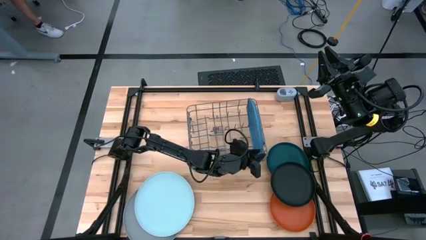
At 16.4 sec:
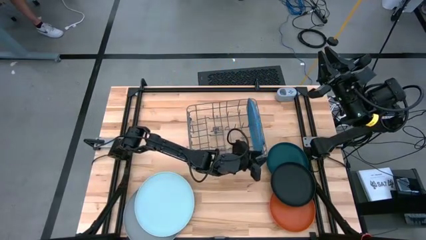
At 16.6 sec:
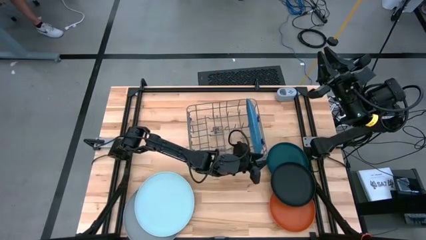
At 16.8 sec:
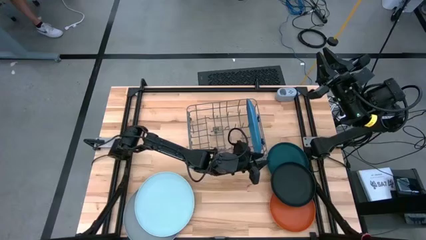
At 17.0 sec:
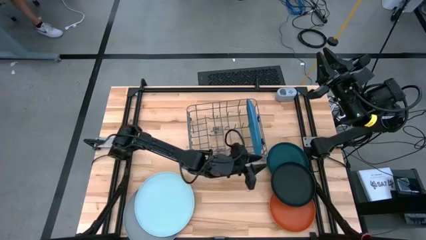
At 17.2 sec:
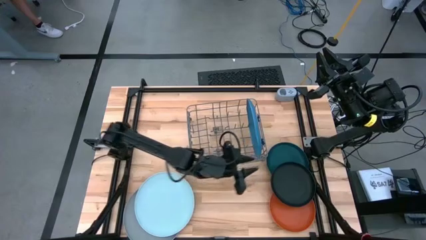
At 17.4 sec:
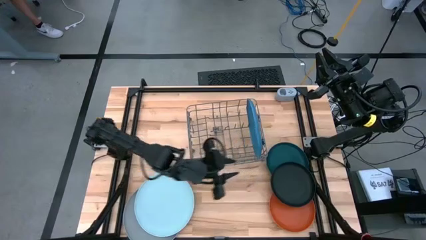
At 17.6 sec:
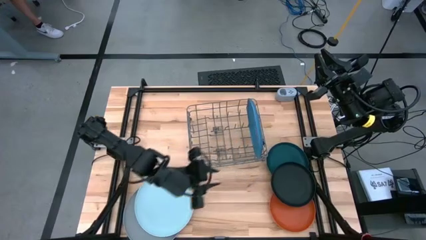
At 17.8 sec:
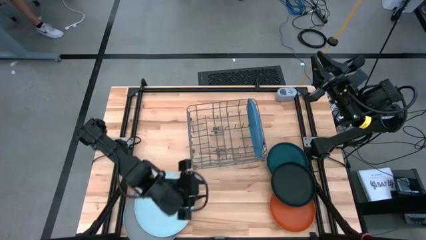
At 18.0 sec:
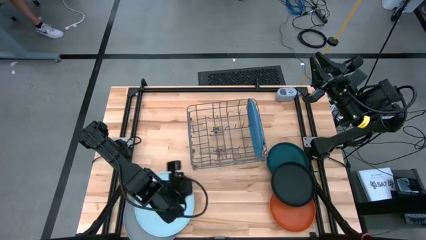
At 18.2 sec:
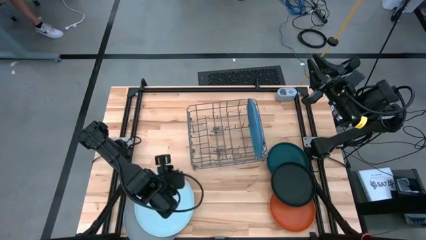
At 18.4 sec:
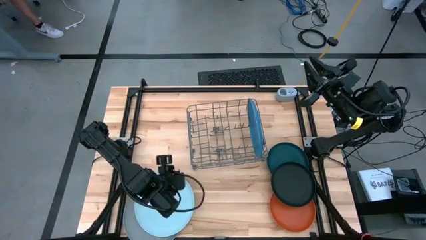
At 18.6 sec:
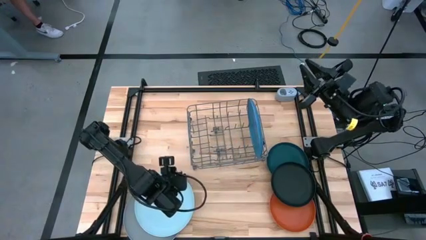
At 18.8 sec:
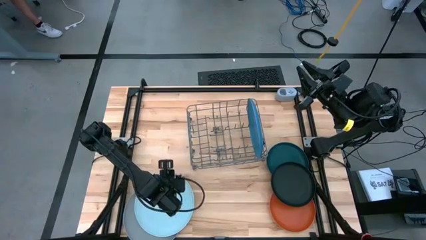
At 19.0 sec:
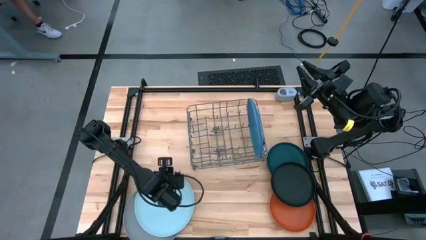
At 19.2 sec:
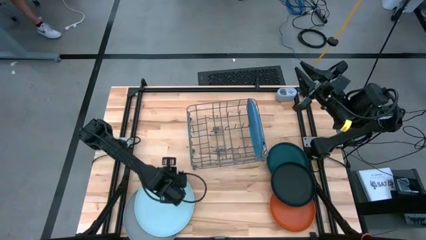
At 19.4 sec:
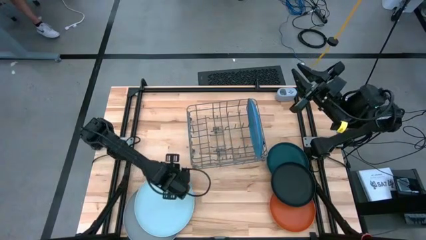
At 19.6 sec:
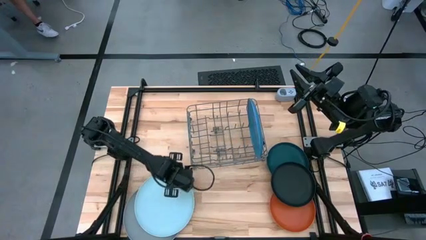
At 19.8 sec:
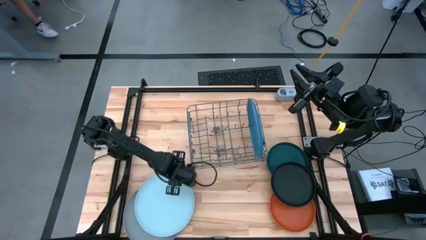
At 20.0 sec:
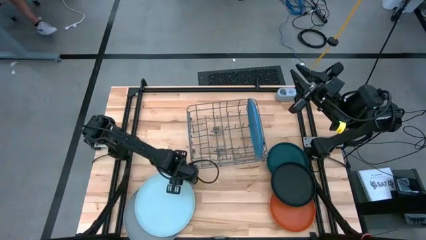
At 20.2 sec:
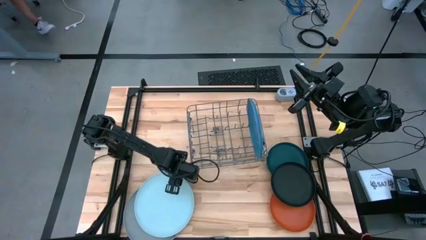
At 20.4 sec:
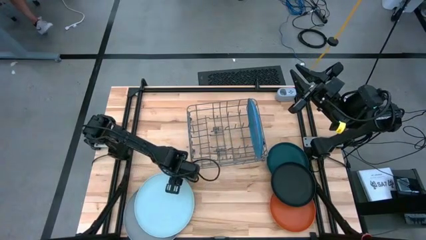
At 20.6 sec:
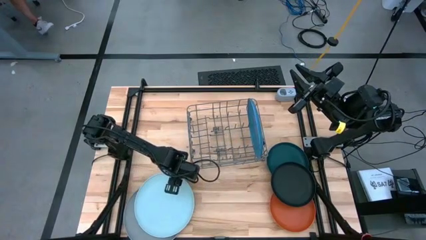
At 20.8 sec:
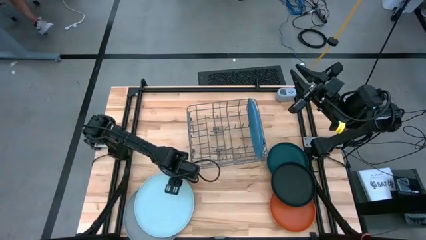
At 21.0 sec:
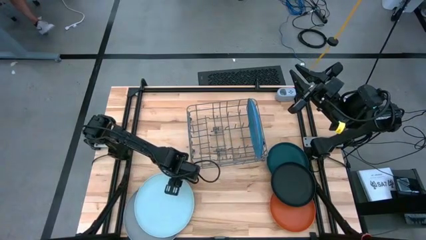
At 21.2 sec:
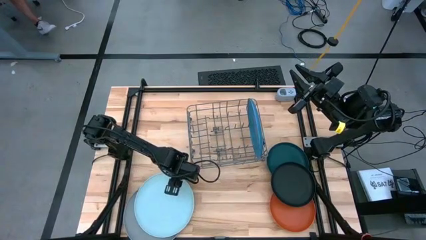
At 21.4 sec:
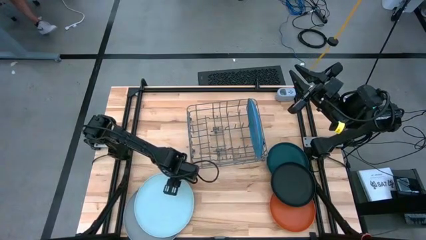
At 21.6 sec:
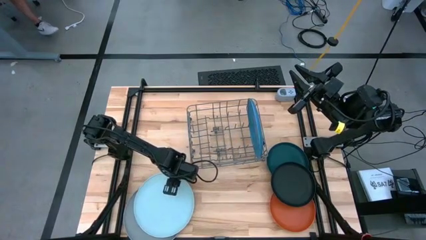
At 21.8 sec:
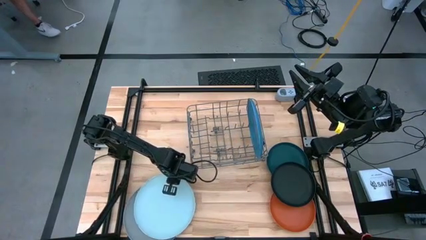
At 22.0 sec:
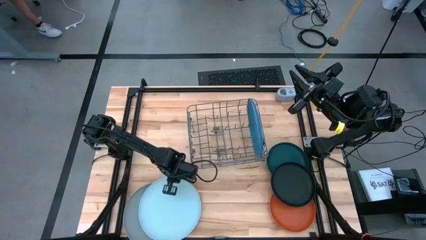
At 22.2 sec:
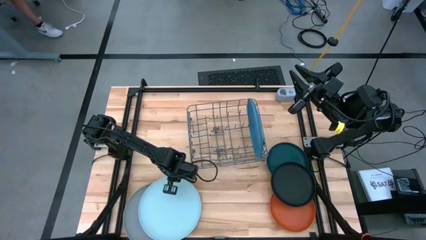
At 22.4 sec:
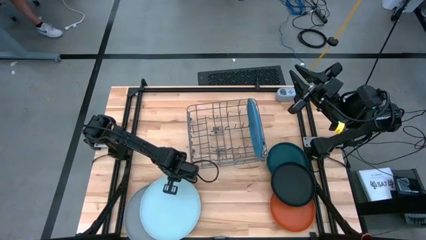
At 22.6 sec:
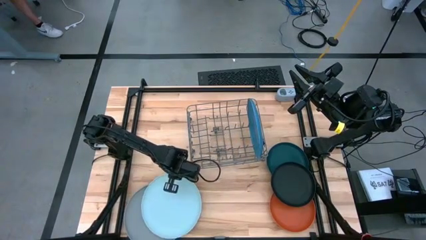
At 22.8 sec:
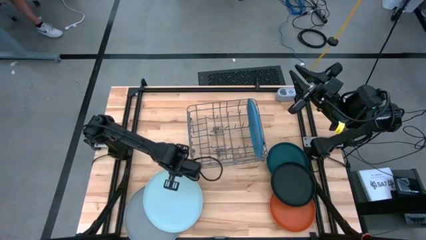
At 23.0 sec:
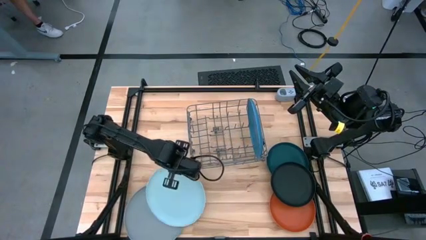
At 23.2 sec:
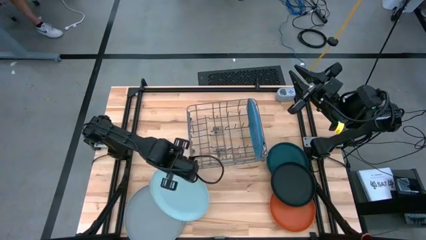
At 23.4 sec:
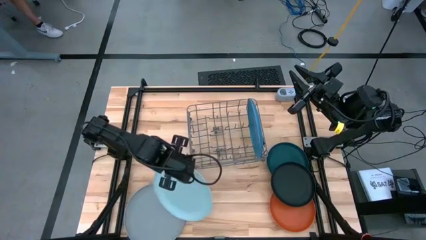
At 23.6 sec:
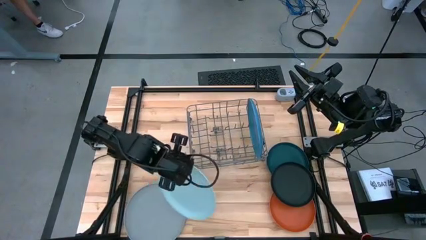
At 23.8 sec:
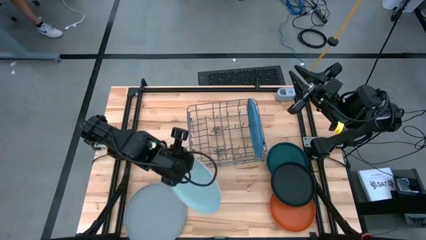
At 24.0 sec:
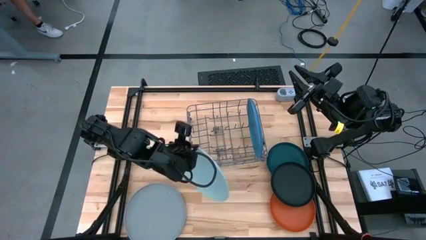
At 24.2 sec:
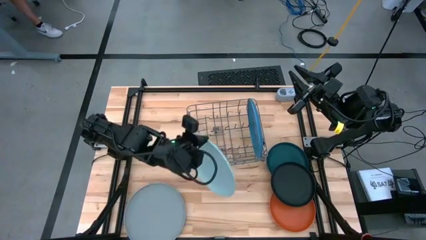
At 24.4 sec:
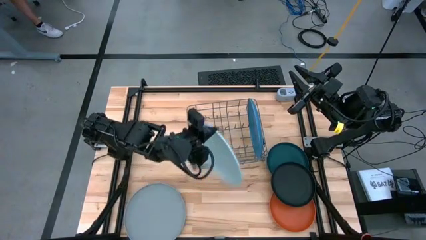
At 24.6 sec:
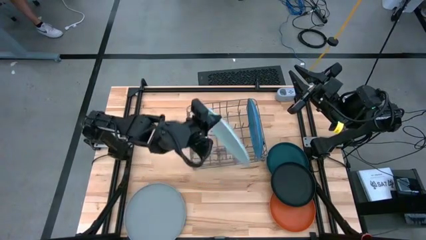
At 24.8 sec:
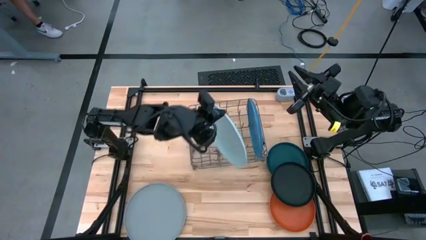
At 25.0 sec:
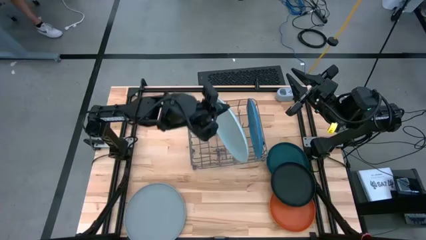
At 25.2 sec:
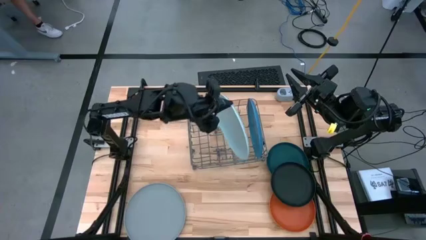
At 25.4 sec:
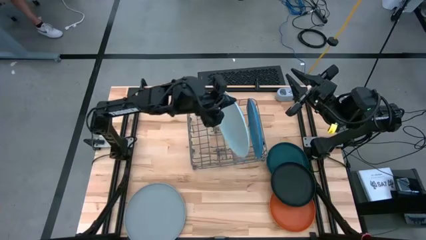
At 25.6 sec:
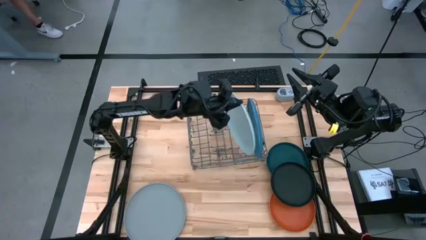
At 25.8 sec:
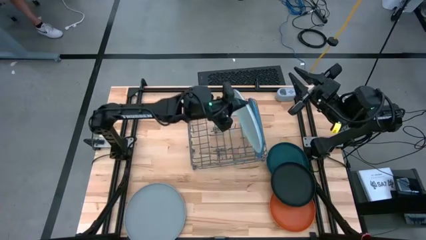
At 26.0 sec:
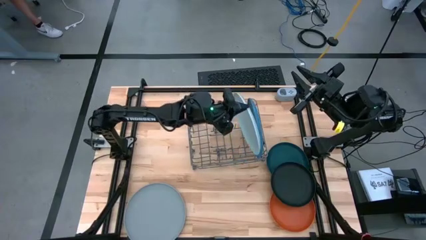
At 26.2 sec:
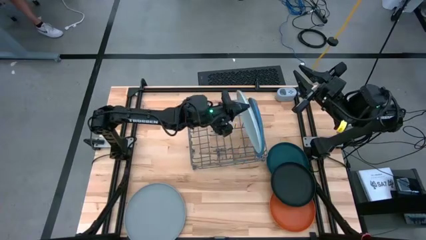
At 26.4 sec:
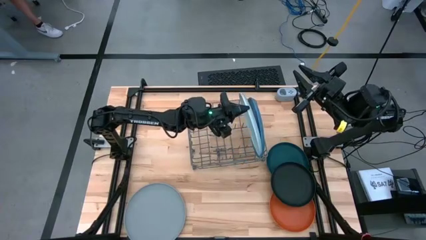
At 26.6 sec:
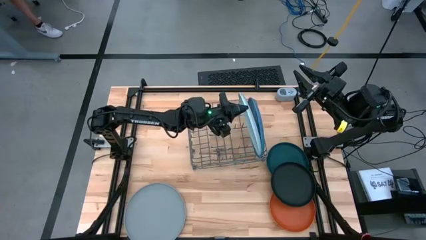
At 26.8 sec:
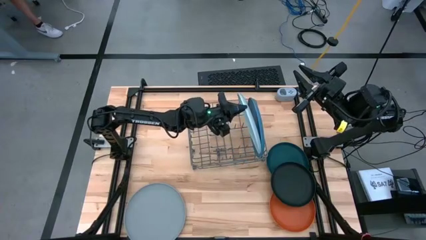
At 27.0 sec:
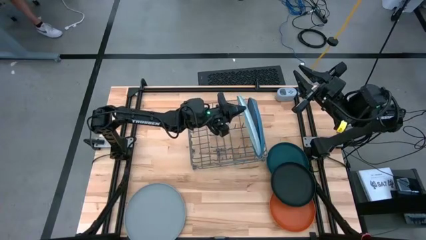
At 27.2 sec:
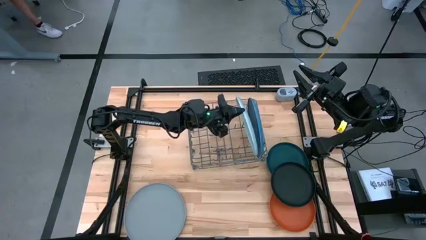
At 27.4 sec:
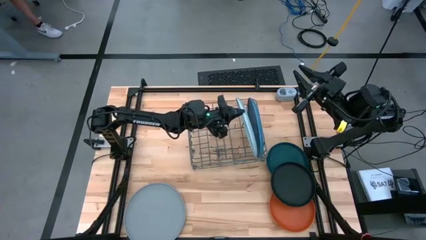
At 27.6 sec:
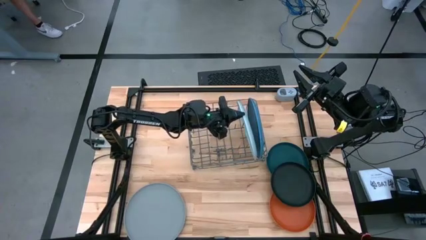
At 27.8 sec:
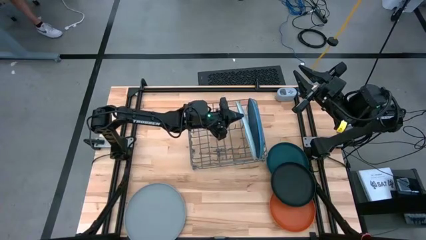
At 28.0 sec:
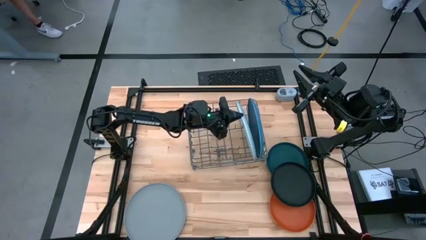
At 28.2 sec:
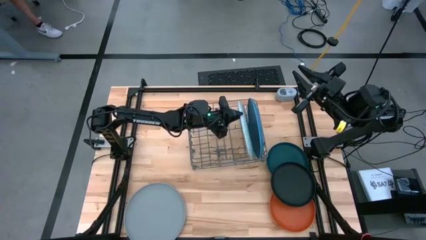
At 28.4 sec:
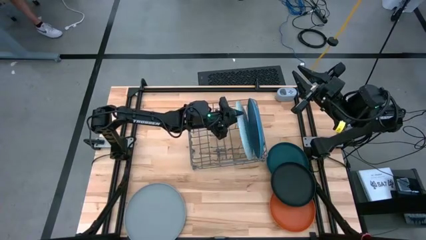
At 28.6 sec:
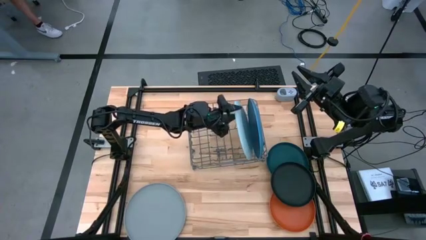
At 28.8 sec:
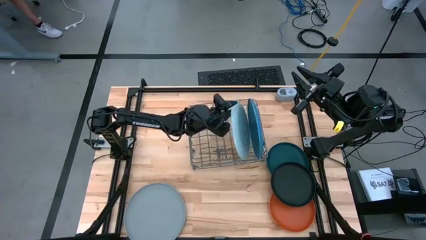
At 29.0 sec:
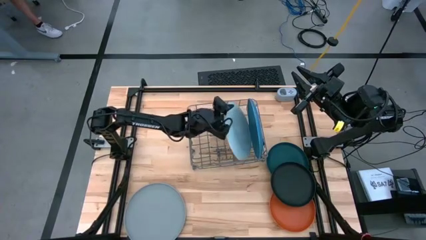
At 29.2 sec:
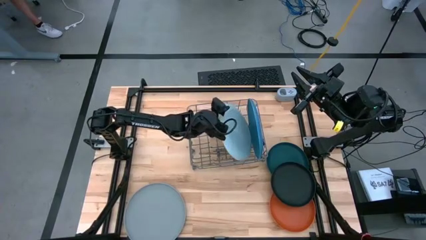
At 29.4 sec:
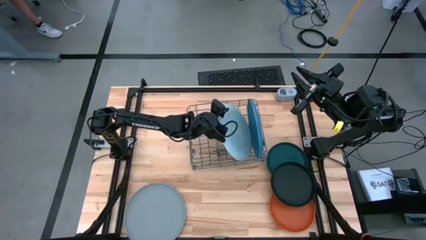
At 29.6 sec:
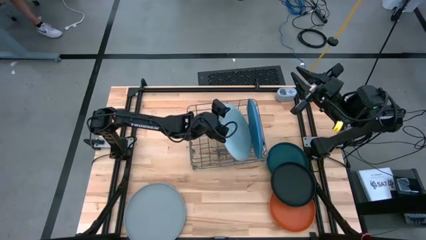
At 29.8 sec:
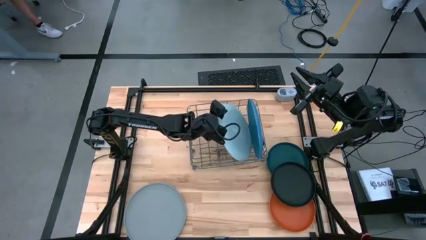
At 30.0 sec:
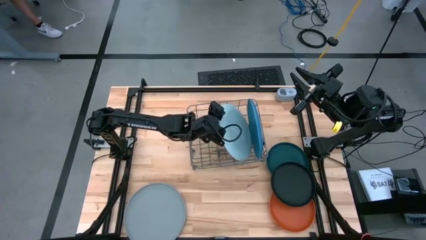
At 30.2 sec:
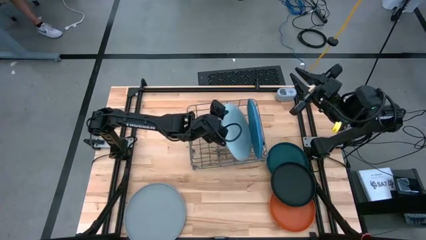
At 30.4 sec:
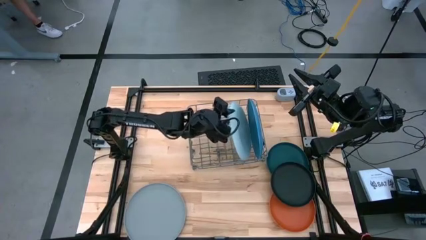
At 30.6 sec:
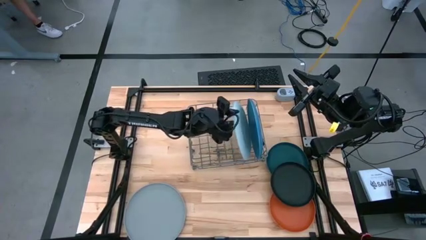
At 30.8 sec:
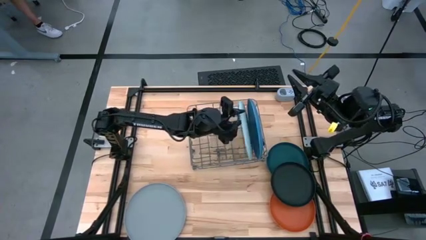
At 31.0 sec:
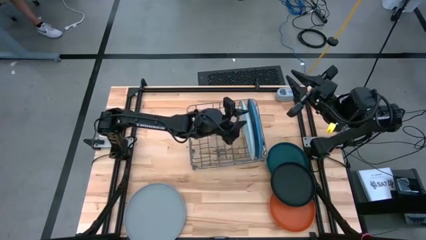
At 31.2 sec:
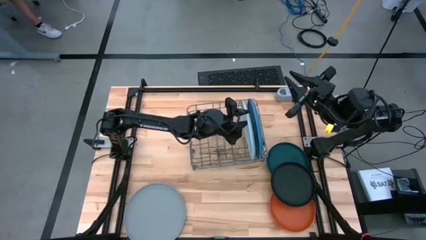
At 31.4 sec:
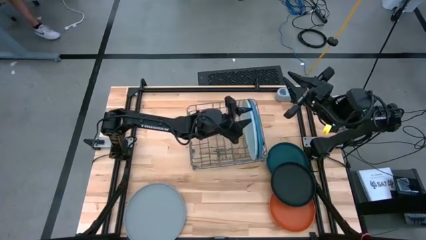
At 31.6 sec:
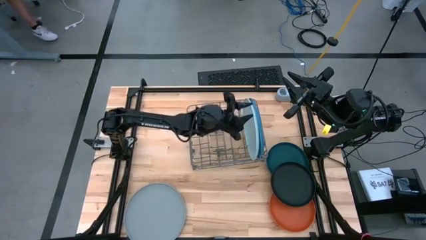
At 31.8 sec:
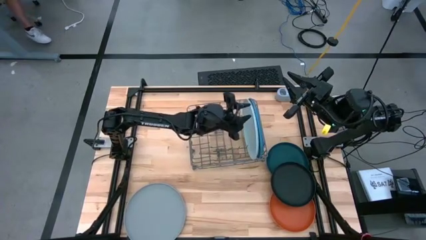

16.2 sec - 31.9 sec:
Task: Sort dishes
Put the light blue plate into the dish rack
